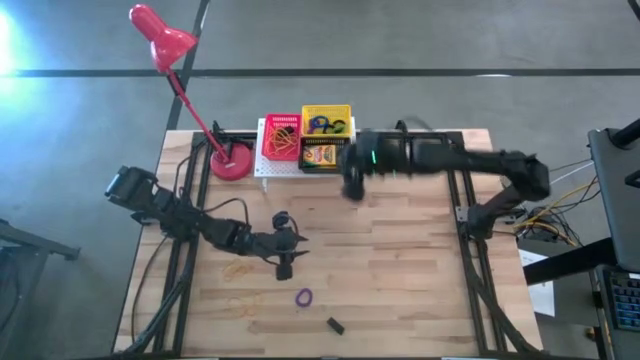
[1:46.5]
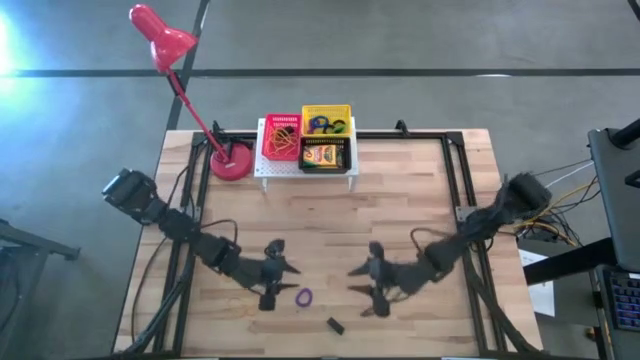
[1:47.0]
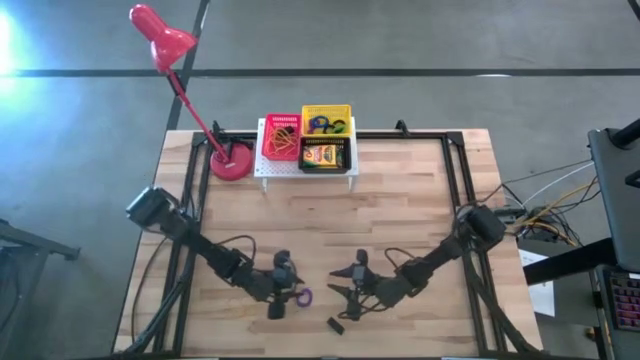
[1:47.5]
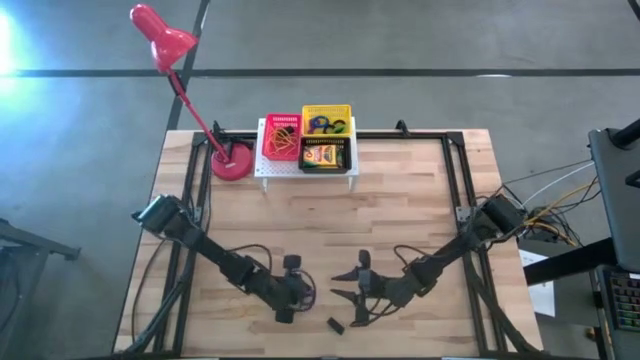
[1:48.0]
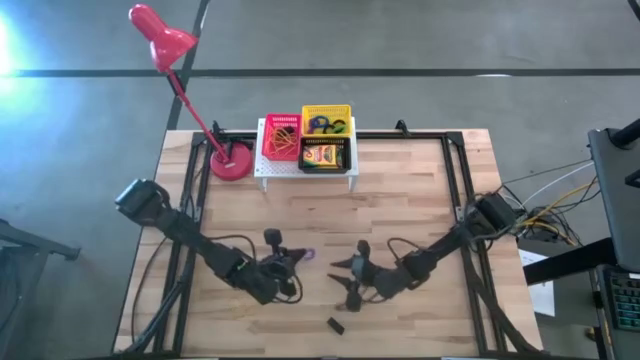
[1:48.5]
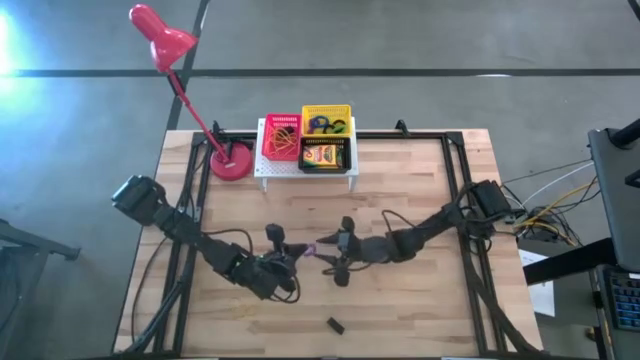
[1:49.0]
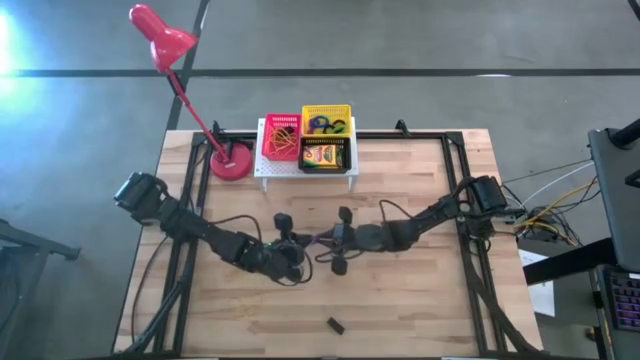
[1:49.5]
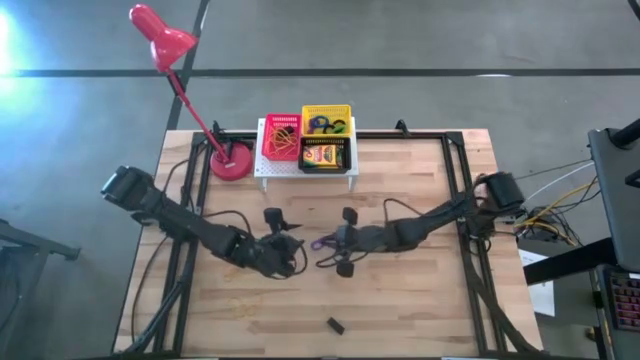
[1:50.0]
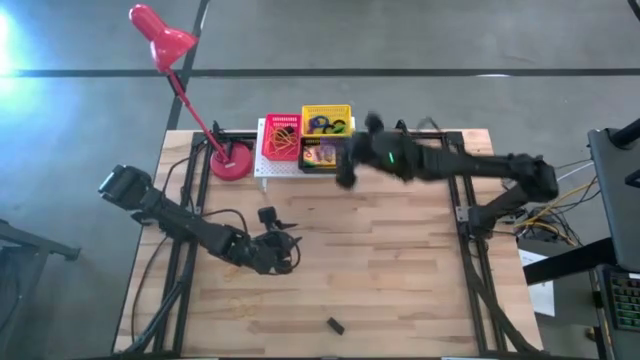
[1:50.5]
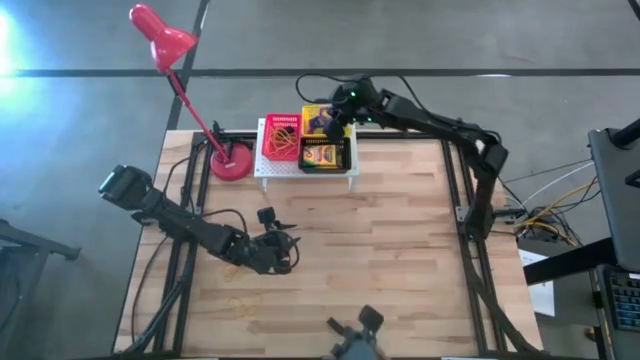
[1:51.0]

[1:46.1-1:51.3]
Task: Pick & Place Office Desk Supplies
Put the purple spring keychain into the yellow bin on the shelf

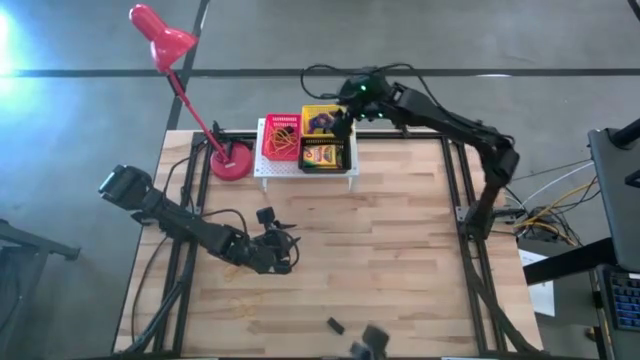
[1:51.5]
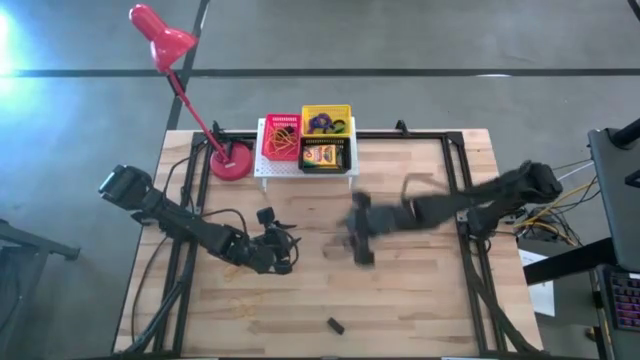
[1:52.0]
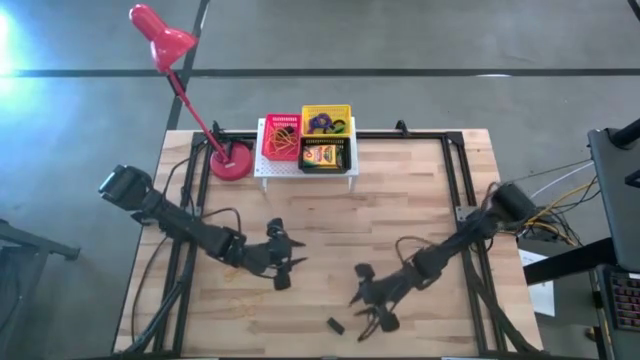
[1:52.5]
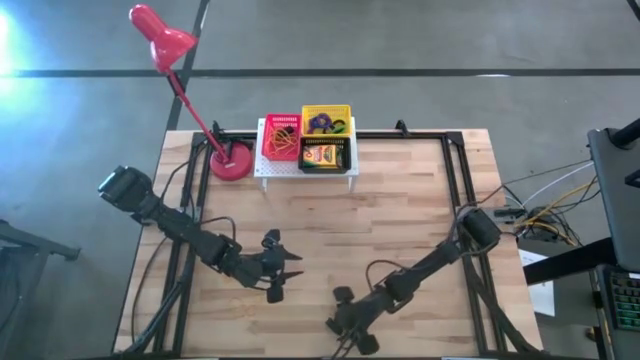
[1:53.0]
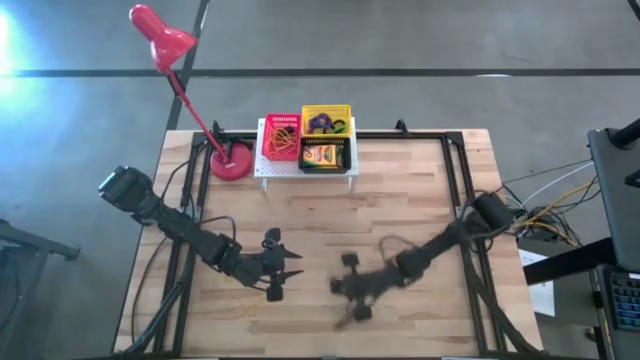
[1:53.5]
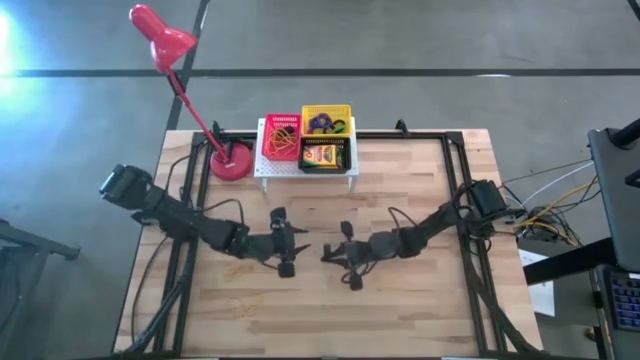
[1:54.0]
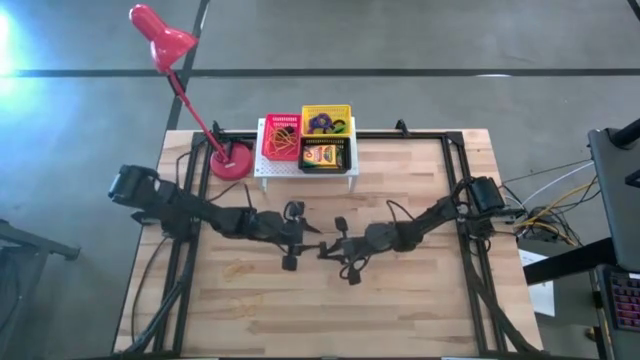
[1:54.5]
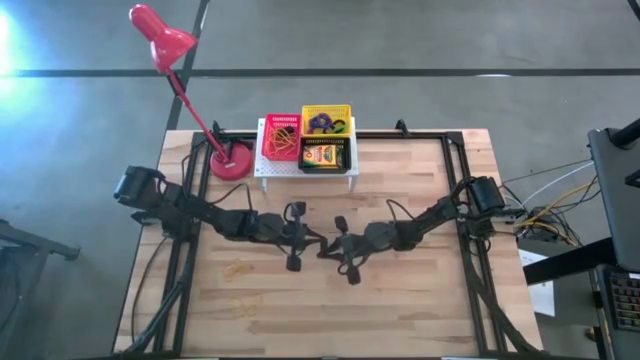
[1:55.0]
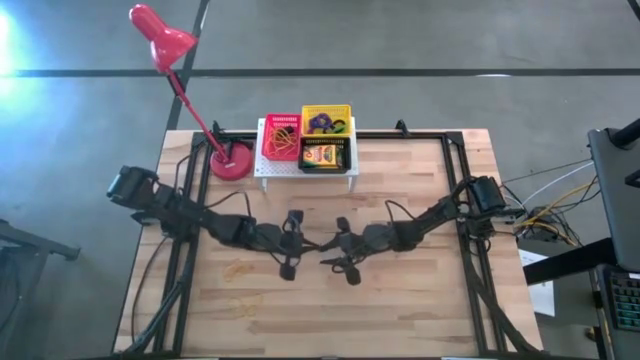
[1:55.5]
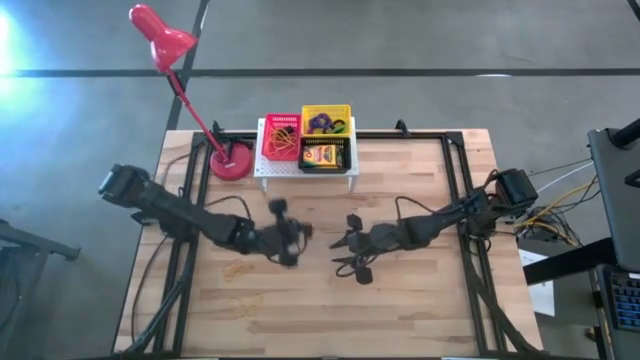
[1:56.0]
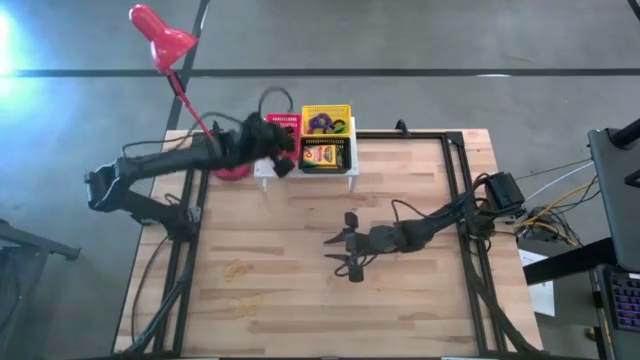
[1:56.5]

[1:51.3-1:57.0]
Put the black rubber band into the red bin on the shelf

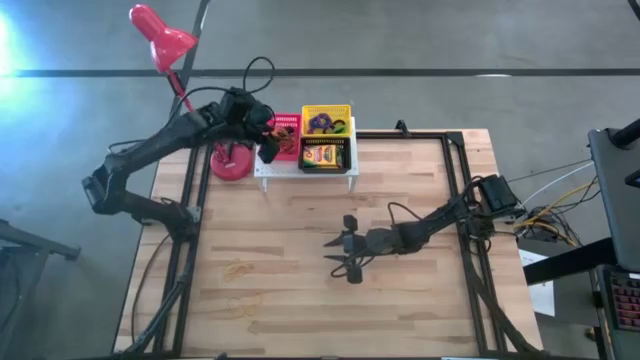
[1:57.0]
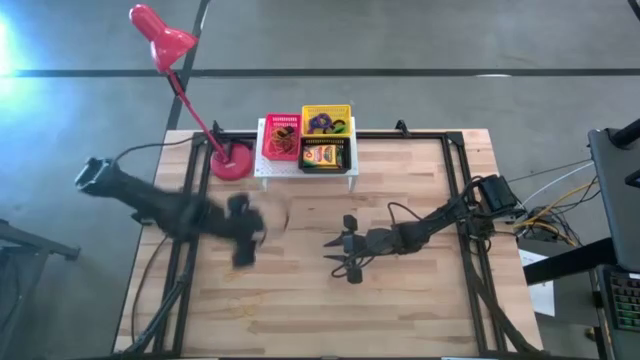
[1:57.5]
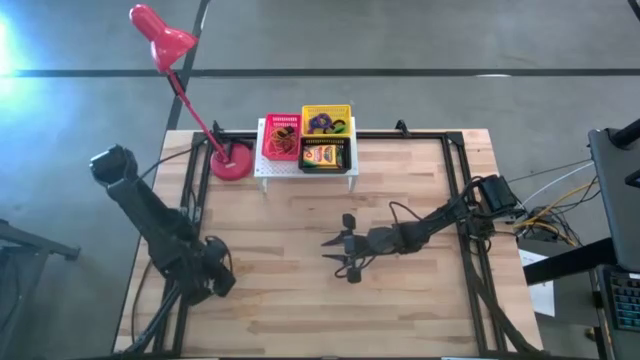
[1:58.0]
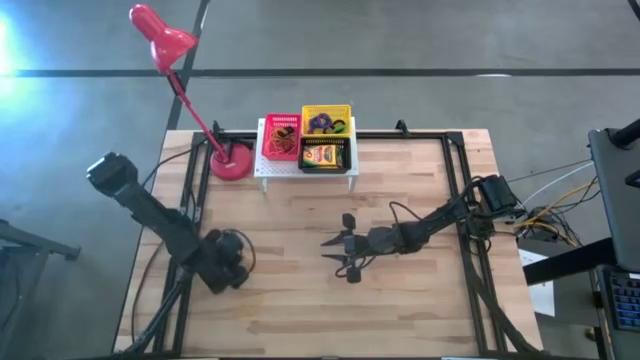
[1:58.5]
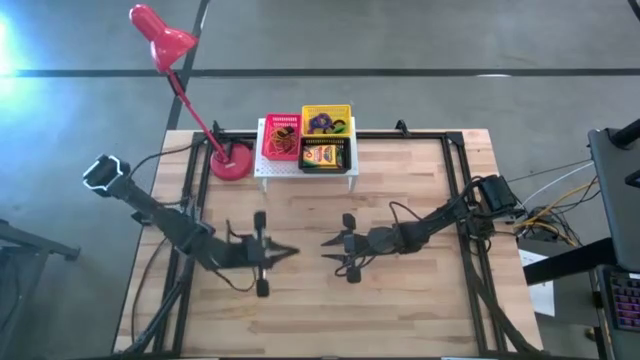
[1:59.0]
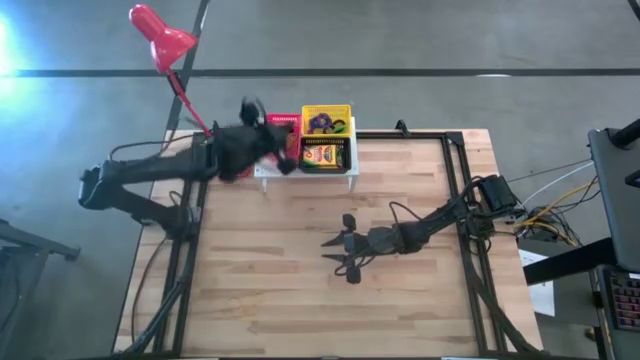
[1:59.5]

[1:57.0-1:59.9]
Put the top yellow rubber band into the red bin on the shelf

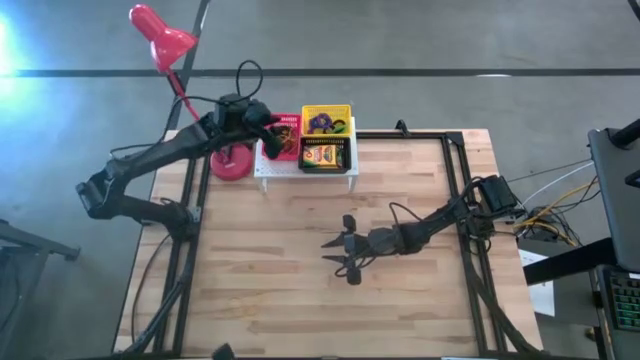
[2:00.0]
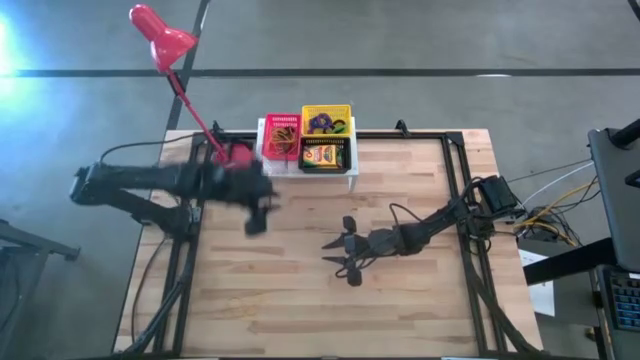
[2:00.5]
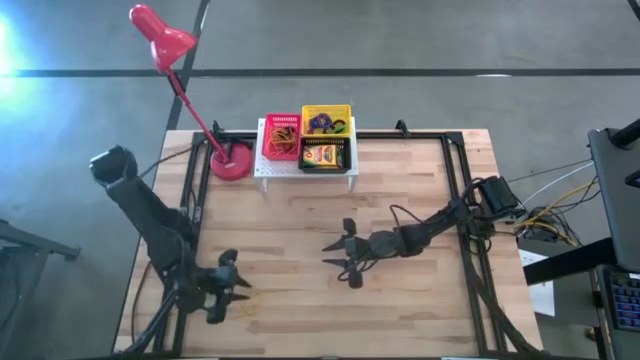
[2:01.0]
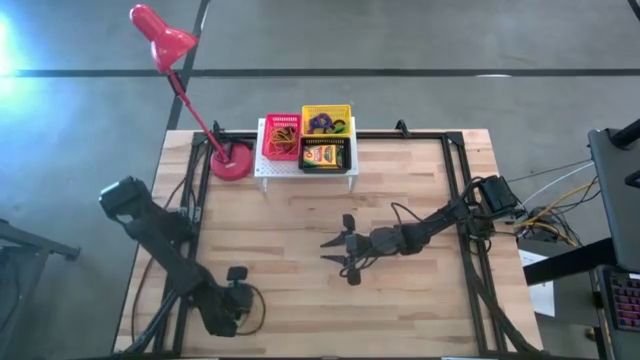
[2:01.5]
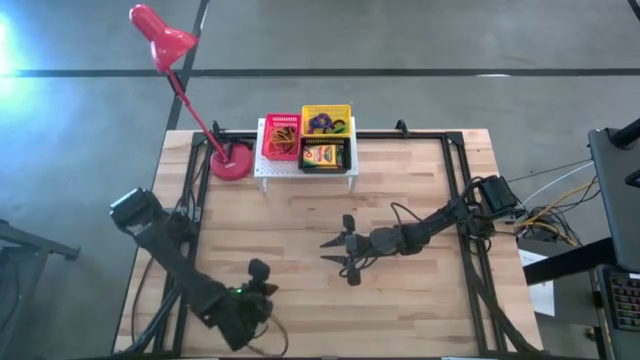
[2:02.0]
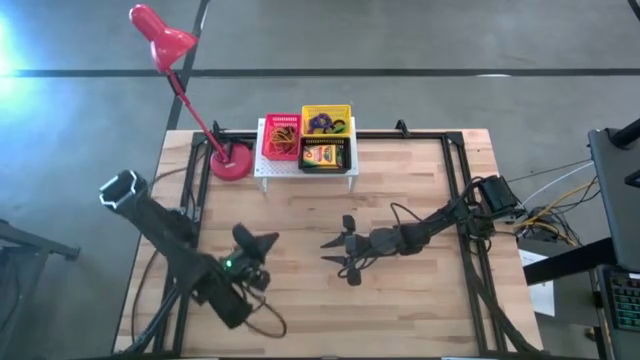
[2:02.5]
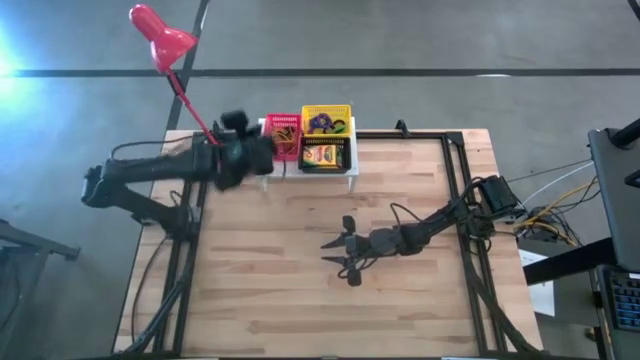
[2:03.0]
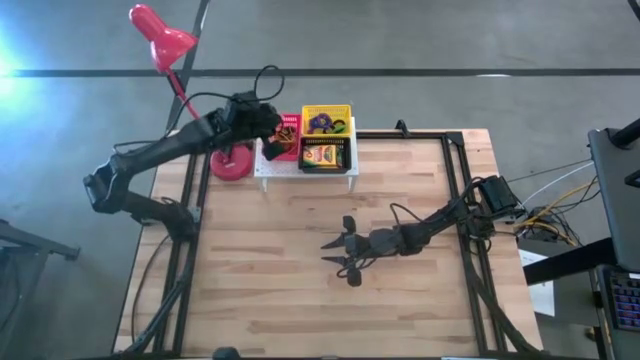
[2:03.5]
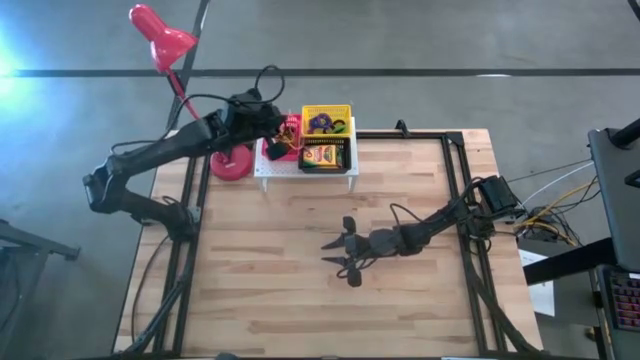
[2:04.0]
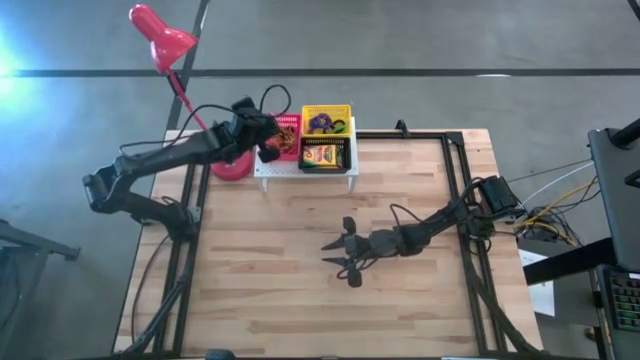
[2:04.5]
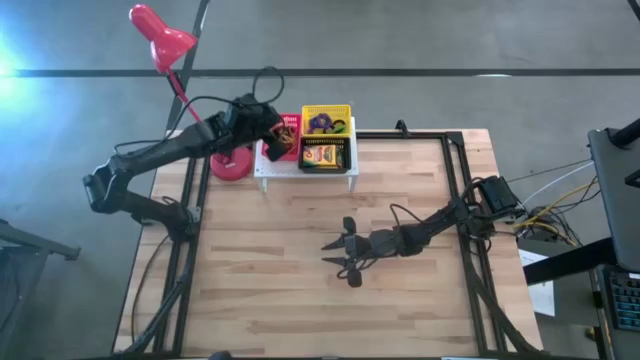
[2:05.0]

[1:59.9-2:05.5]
Put the yellow rubber band into the red bin on the shelf

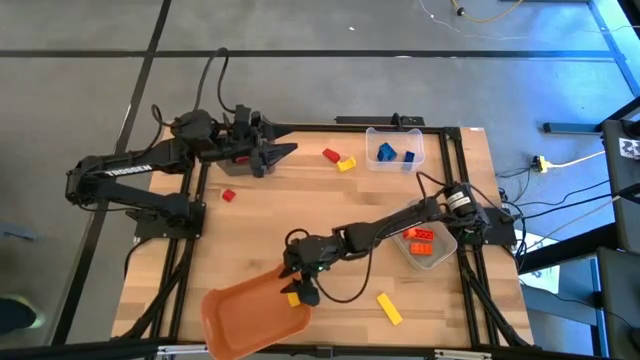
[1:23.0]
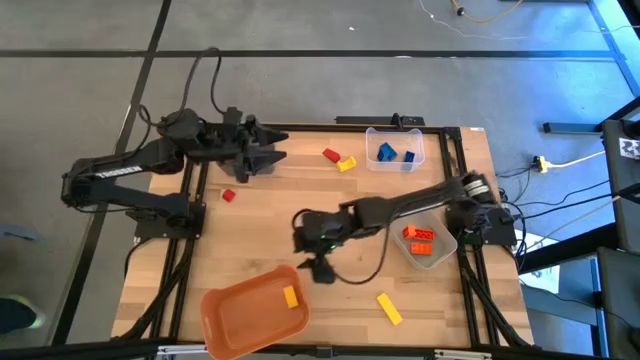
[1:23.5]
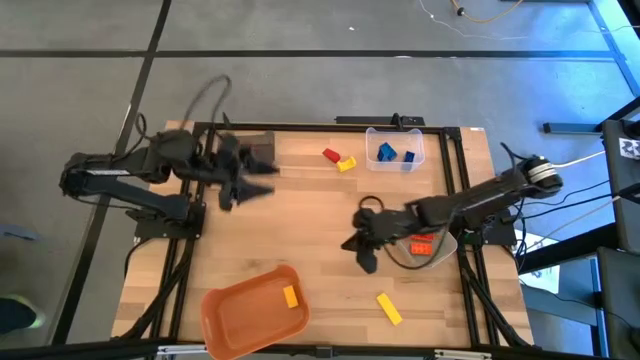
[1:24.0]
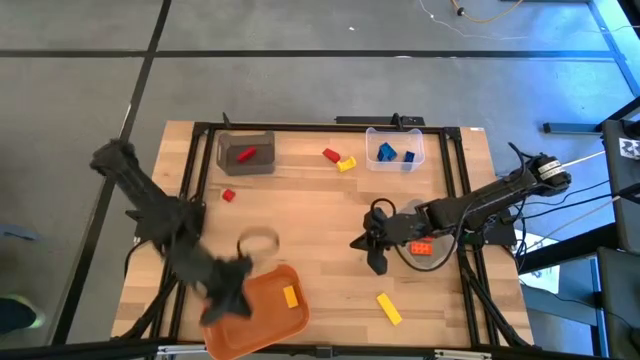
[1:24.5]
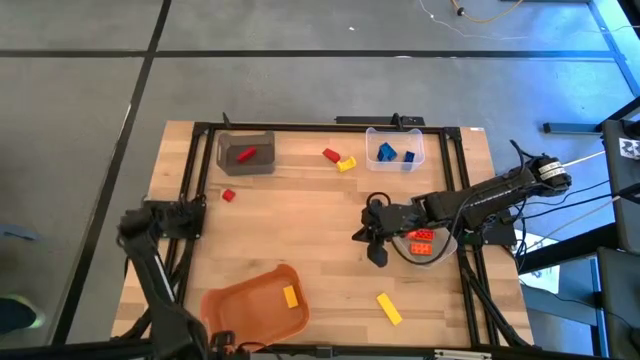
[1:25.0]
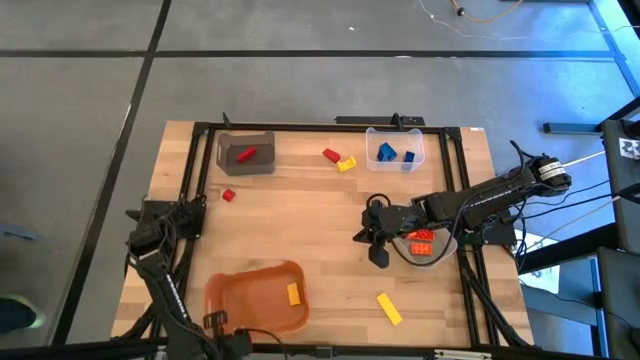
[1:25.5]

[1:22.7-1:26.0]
Task: Sort & place blocks by color
Adjust the orange bin
